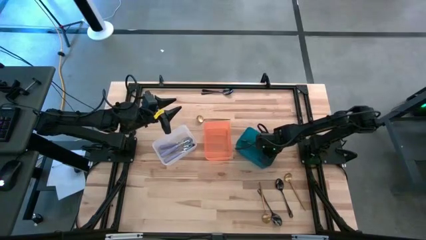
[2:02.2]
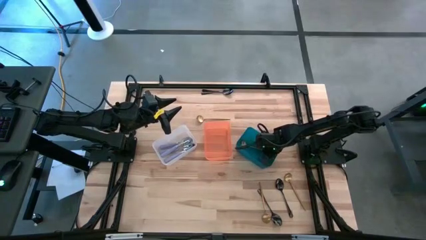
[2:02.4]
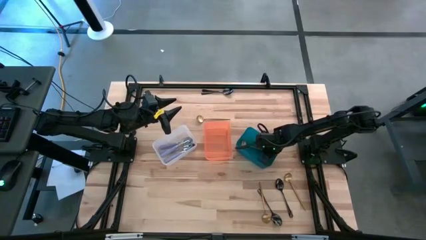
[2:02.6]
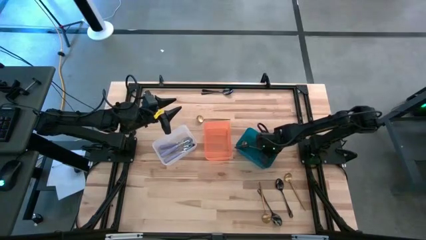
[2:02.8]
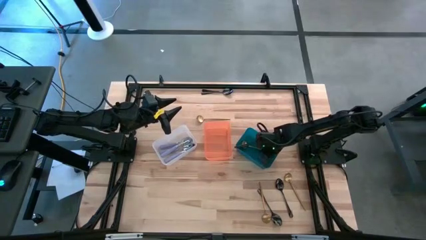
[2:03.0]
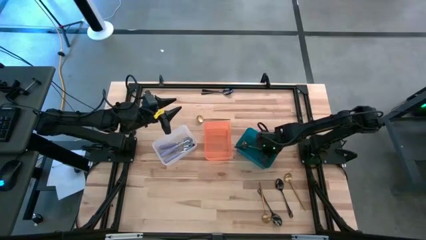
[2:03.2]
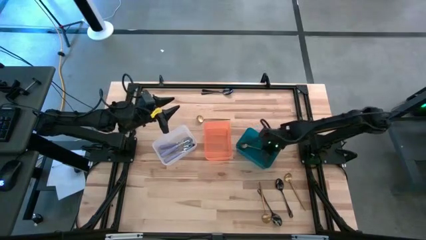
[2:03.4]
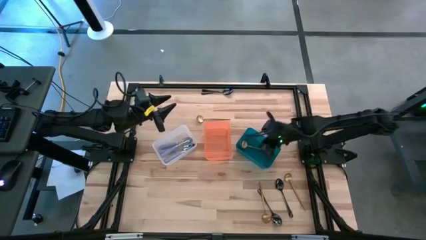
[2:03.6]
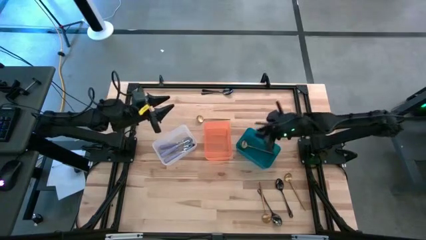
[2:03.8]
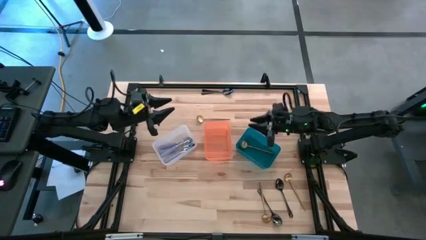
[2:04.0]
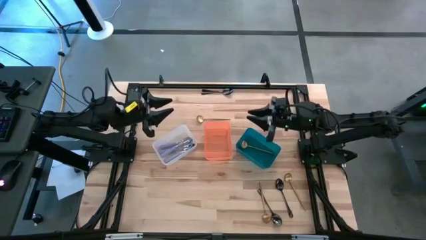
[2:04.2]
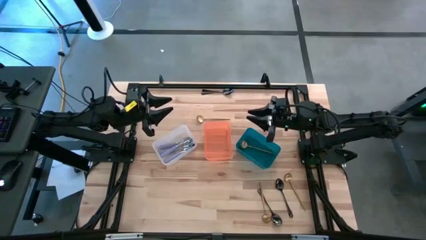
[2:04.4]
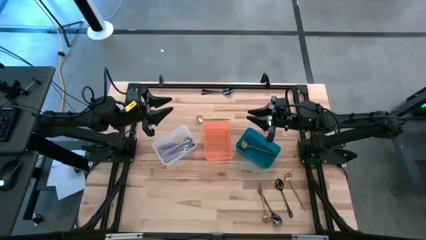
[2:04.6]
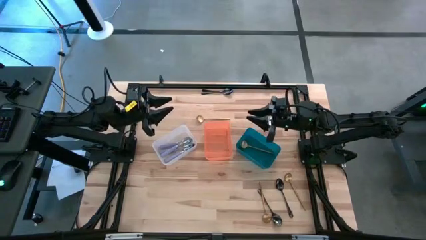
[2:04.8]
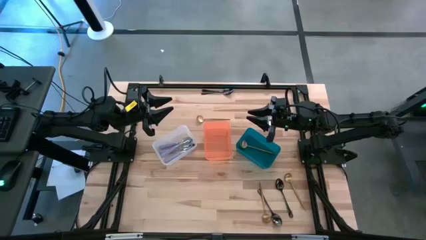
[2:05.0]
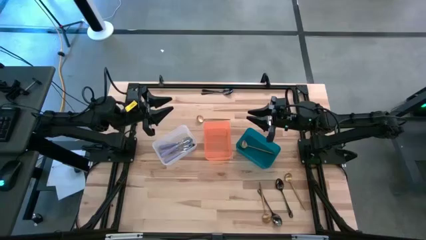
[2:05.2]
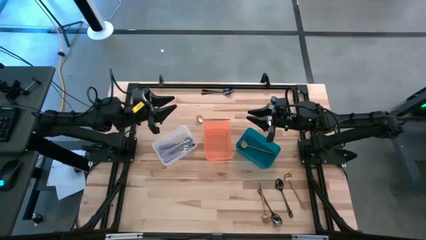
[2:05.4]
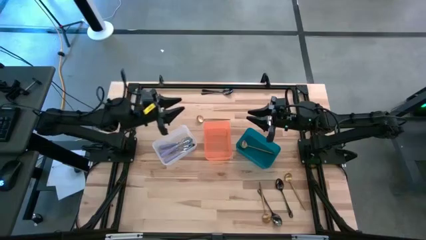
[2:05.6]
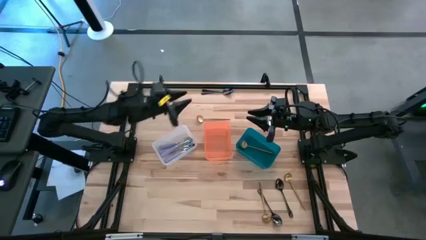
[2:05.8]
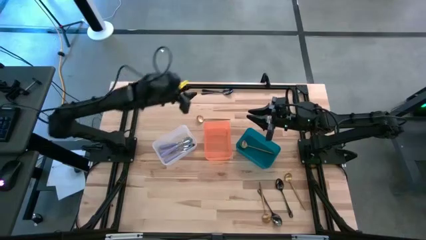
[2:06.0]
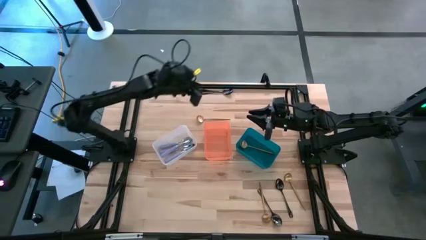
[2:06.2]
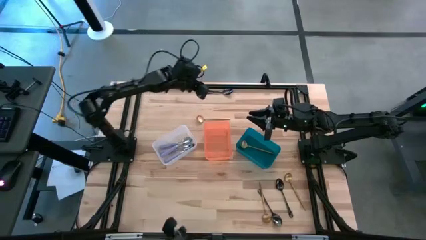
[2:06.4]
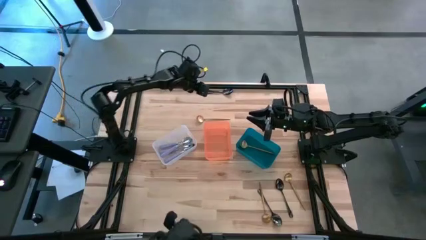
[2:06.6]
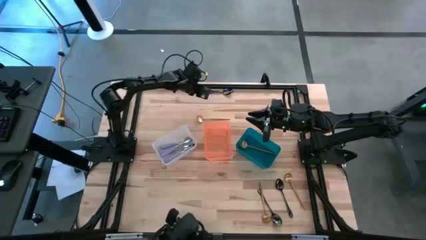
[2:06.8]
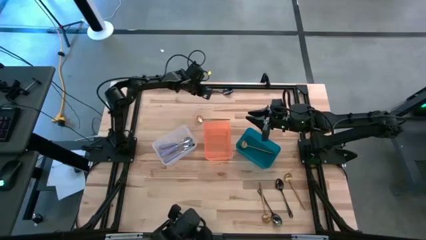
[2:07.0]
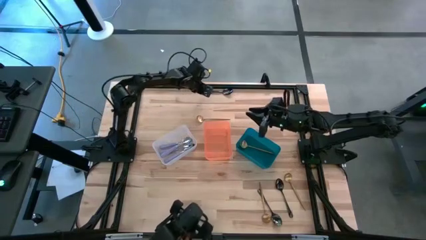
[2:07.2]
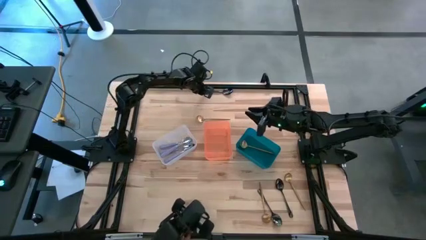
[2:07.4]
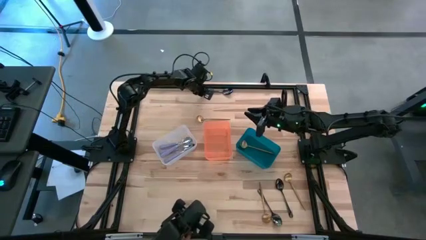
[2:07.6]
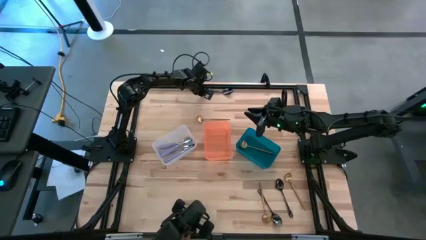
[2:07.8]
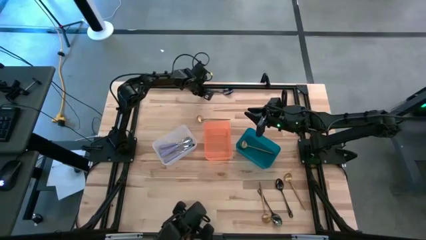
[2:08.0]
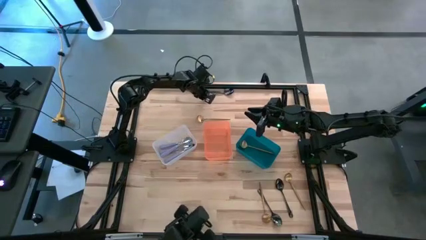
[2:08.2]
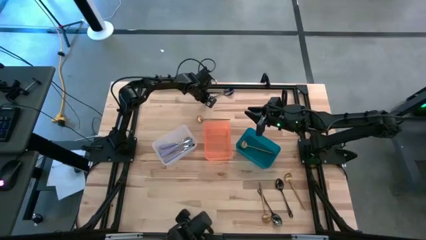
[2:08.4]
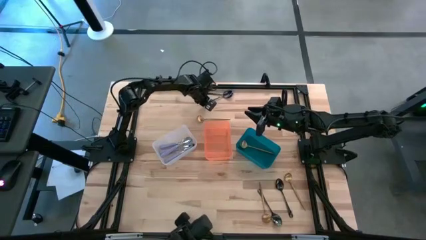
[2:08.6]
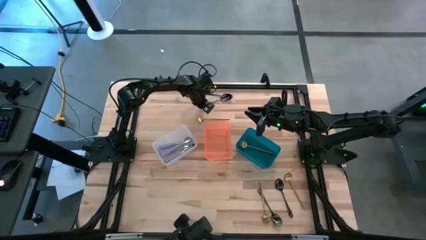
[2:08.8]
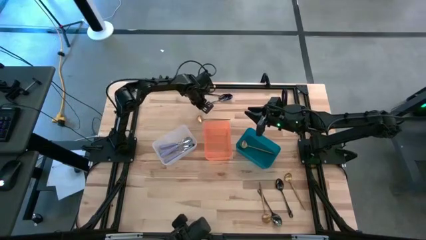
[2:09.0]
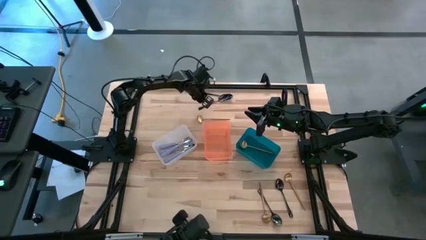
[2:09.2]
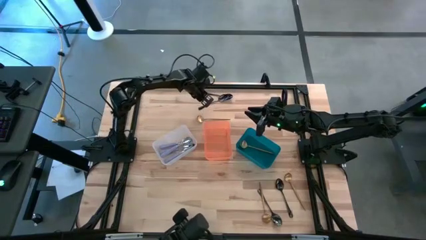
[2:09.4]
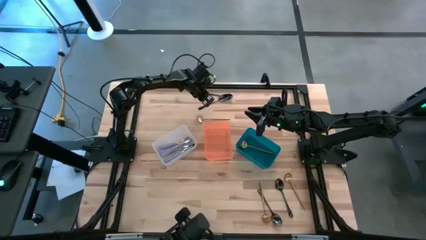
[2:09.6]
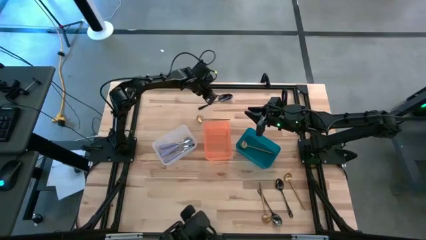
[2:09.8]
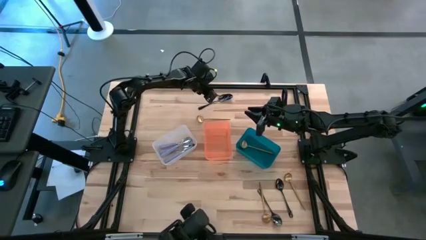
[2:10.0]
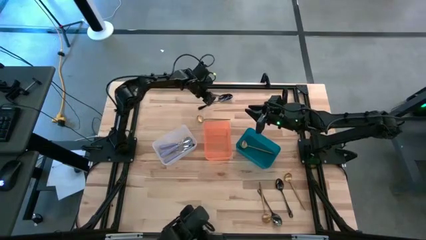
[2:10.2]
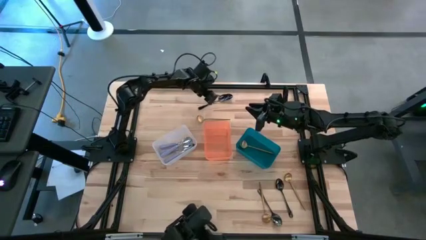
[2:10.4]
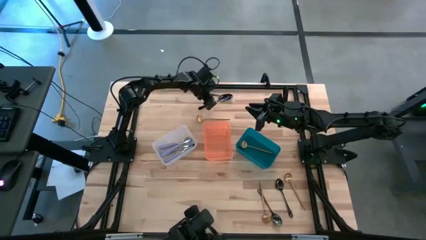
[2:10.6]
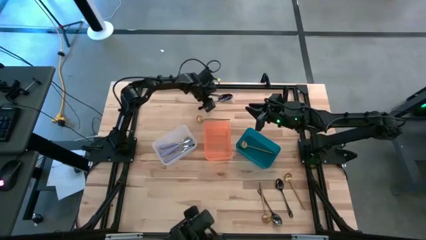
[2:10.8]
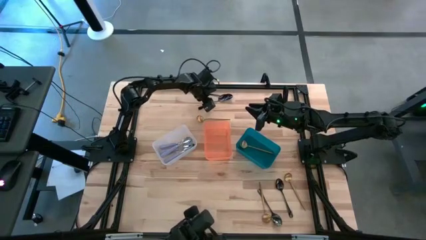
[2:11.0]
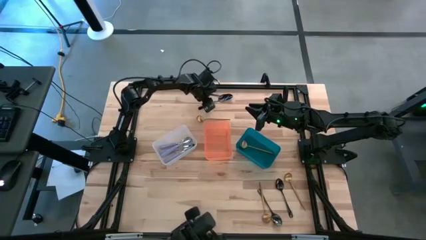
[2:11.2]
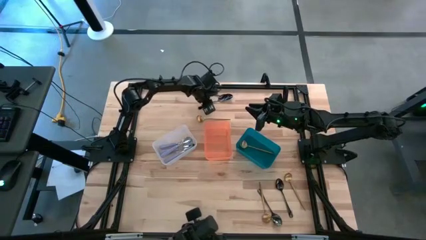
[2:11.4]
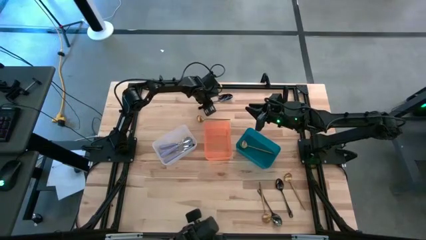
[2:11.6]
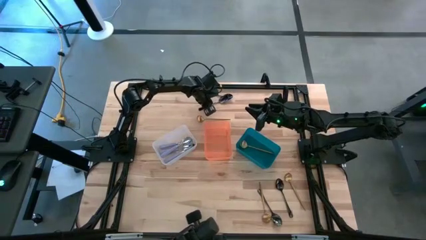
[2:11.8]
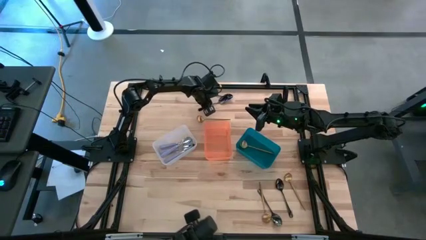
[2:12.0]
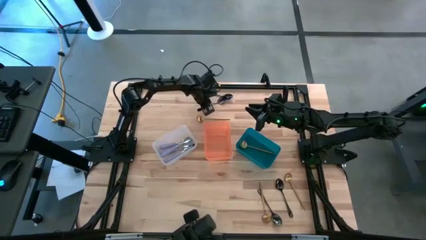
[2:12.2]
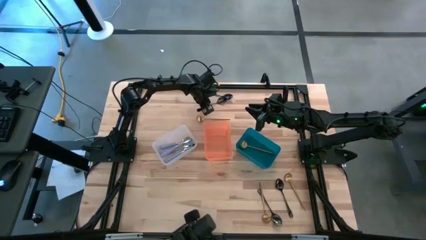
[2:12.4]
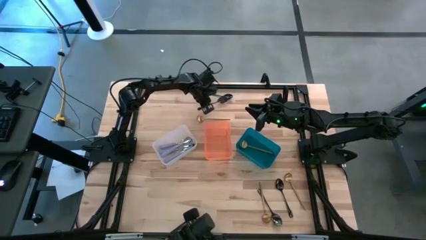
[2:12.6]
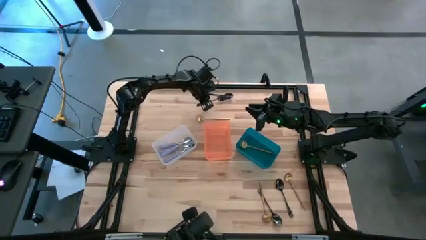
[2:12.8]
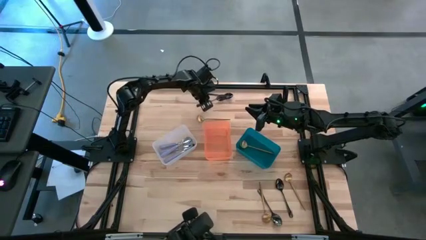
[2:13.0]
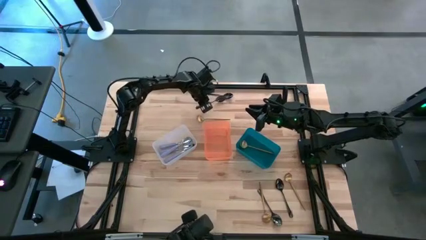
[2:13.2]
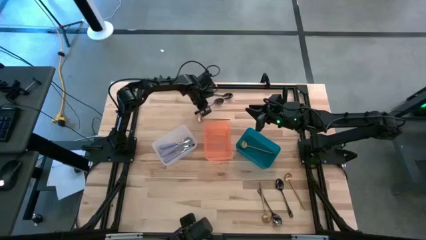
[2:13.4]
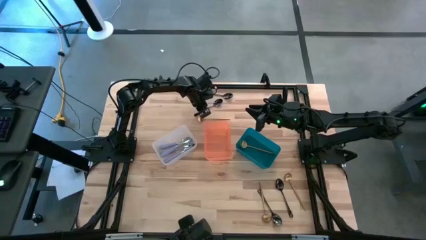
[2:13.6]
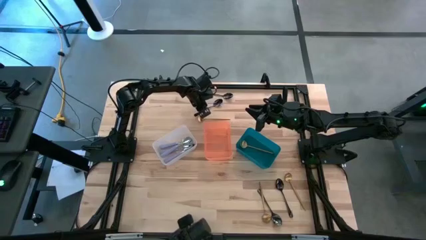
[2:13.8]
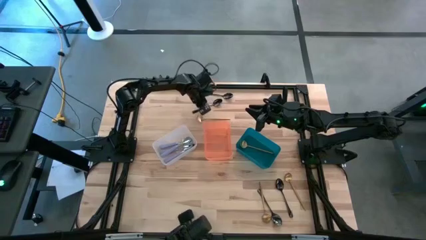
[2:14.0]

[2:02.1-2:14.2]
Task: Sort silverware by color (type)
Put the black spoon into the orange bin

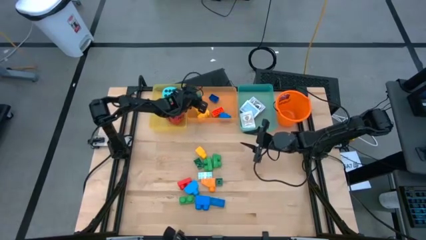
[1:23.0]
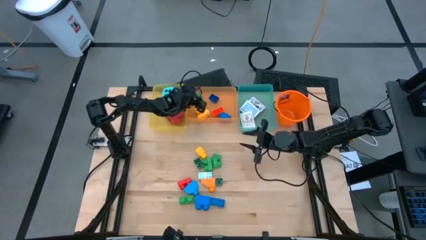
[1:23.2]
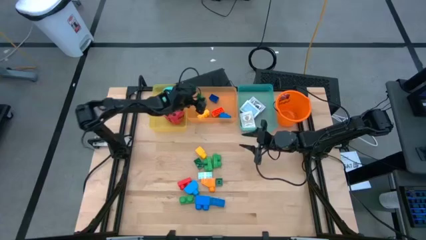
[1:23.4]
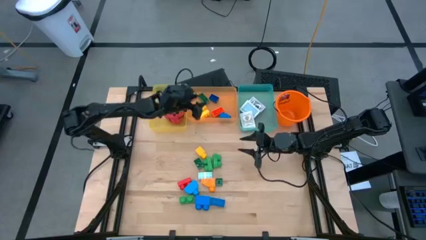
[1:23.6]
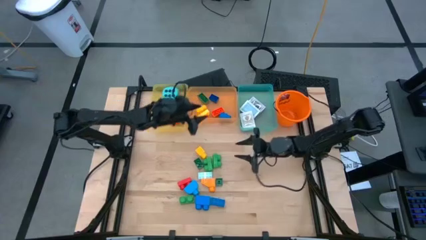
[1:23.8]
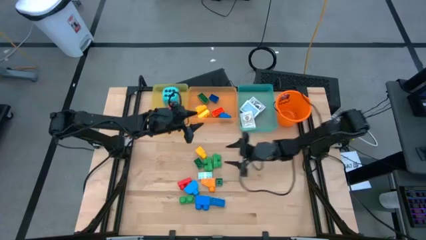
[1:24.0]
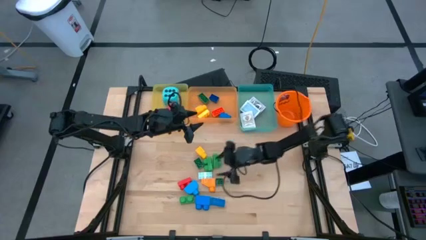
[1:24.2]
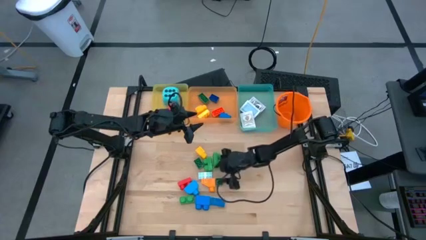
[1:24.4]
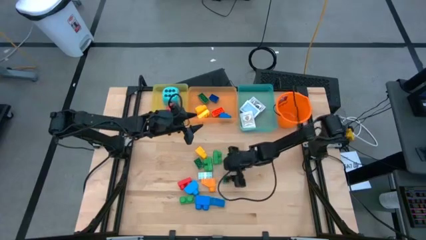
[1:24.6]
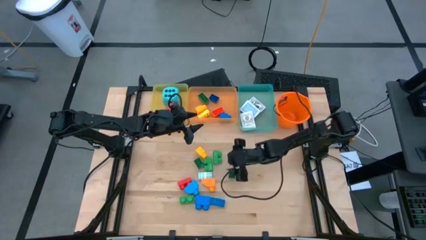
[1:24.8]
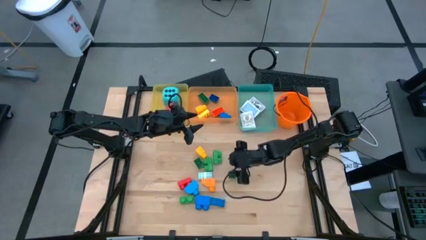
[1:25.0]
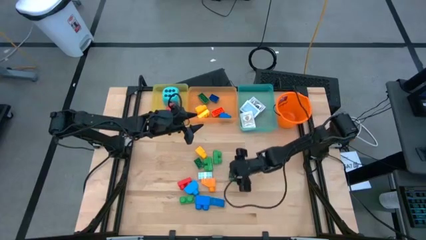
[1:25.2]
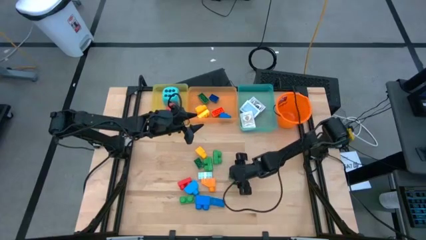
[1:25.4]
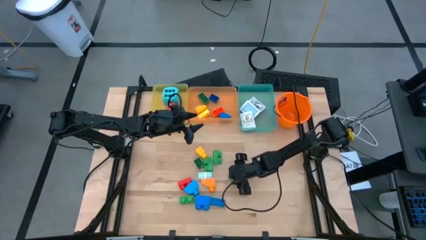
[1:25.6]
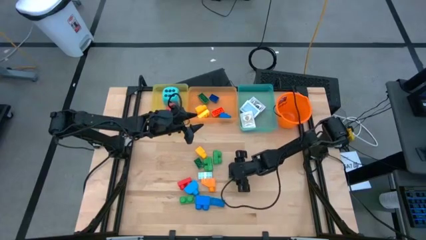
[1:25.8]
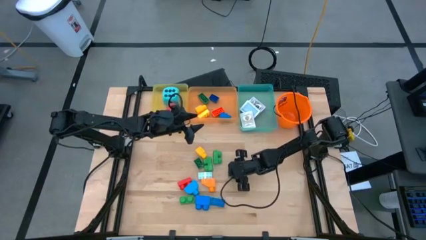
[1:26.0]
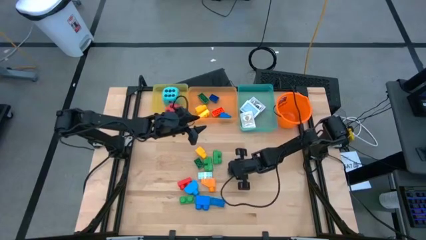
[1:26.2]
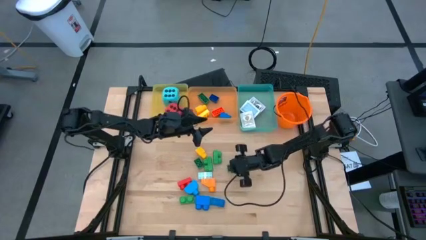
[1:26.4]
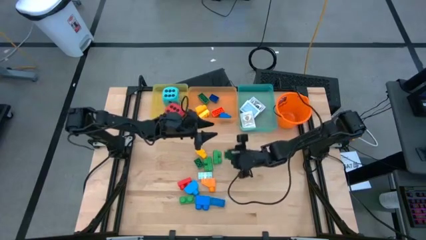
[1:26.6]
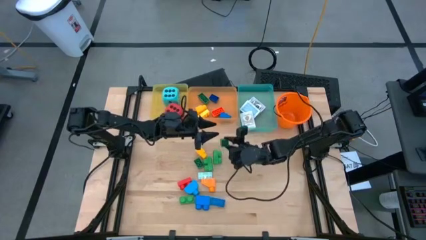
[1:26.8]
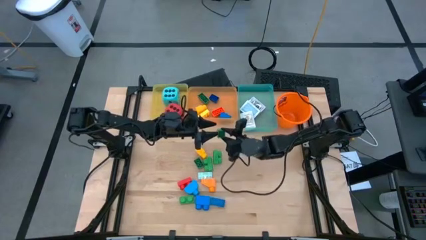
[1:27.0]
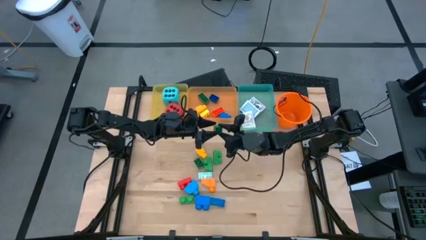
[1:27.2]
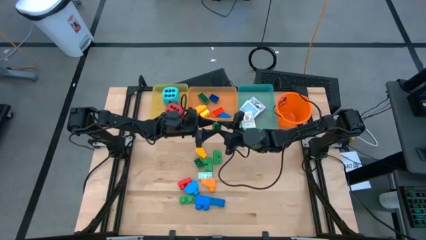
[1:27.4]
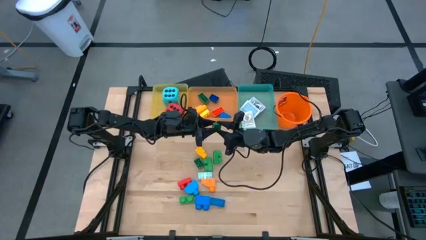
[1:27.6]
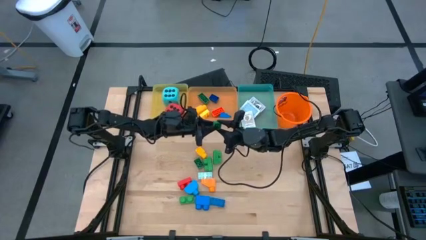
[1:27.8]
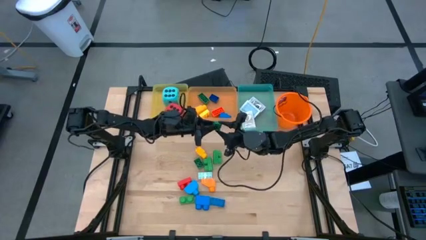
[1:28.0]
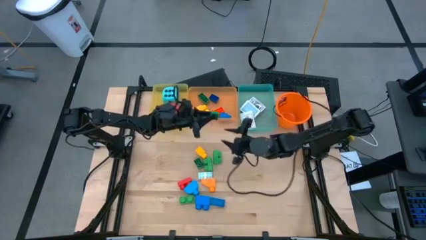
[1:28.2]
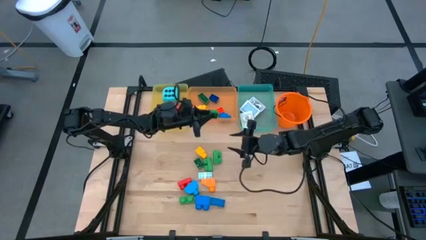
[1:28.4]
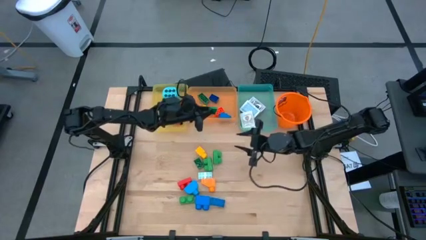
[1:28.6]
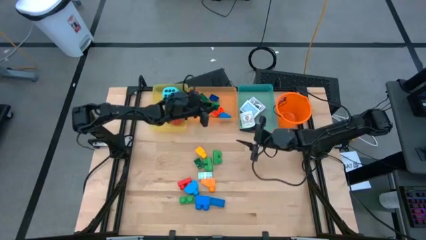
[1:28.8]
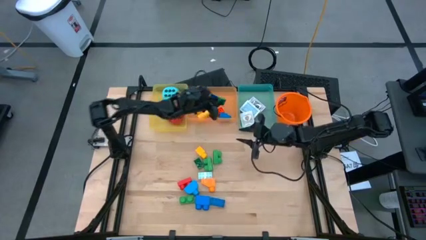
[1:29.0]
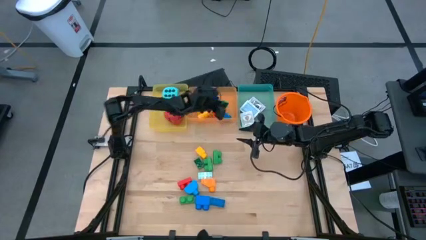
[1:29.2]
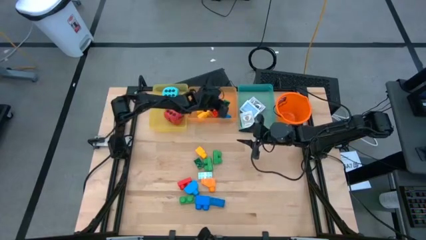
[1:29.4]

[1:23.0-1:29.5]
Task: Pick & Place Toys
Put the green game piece into the orange bin
